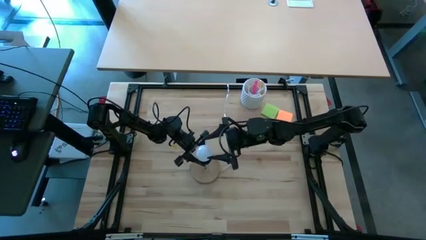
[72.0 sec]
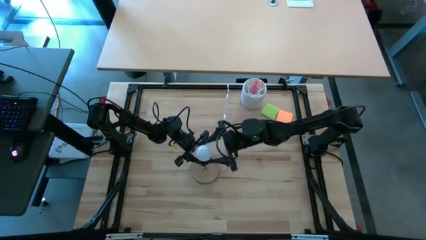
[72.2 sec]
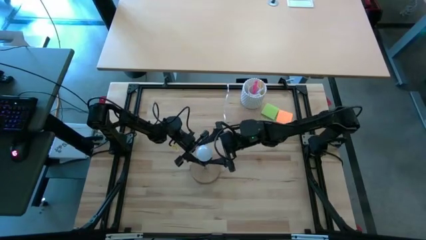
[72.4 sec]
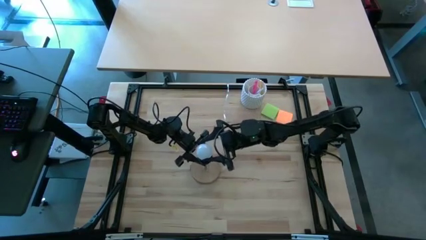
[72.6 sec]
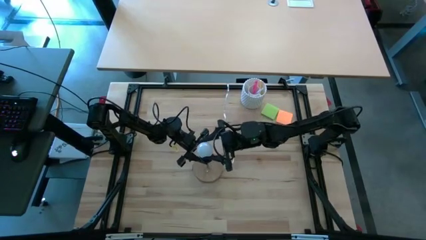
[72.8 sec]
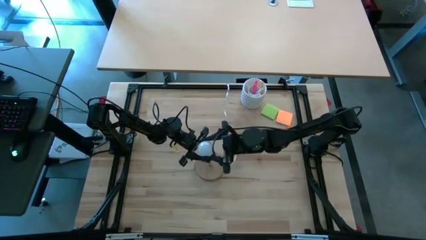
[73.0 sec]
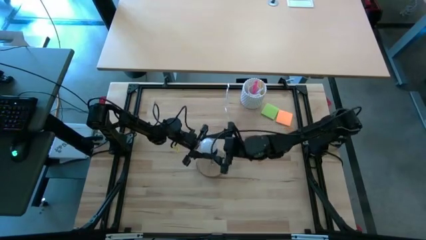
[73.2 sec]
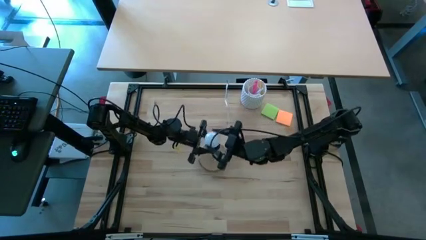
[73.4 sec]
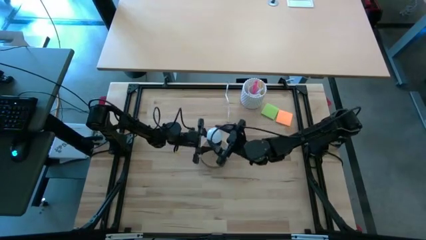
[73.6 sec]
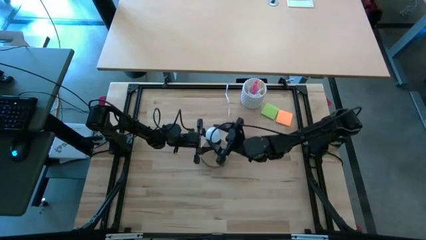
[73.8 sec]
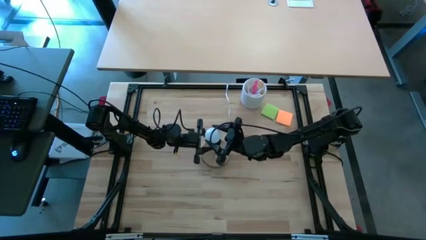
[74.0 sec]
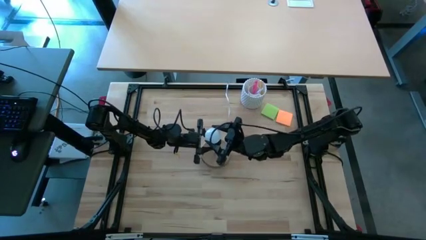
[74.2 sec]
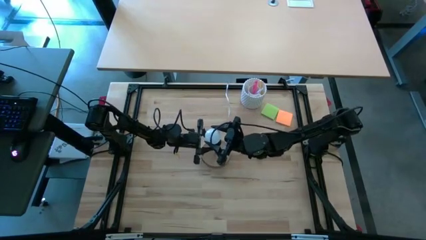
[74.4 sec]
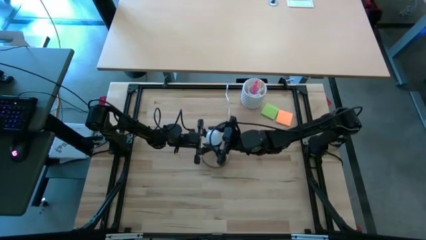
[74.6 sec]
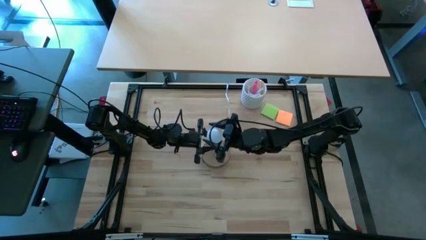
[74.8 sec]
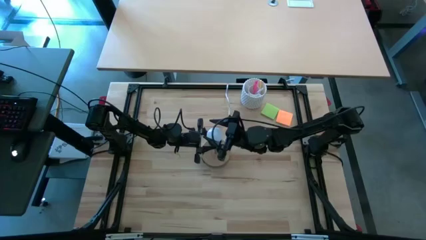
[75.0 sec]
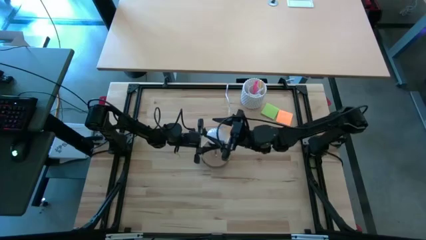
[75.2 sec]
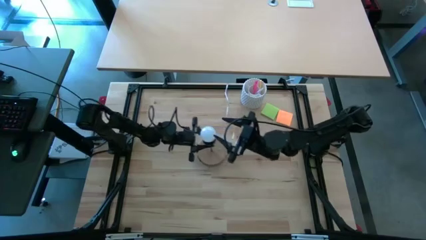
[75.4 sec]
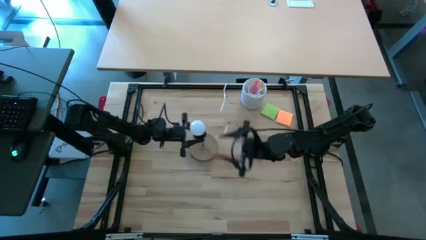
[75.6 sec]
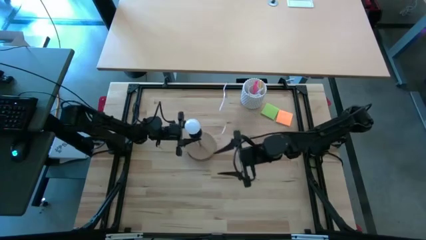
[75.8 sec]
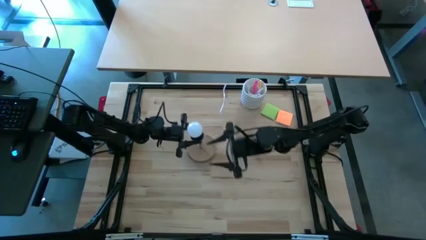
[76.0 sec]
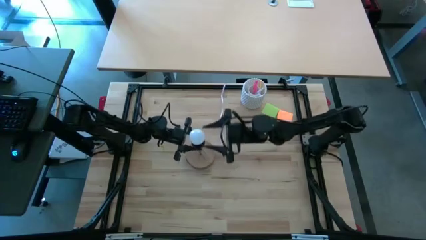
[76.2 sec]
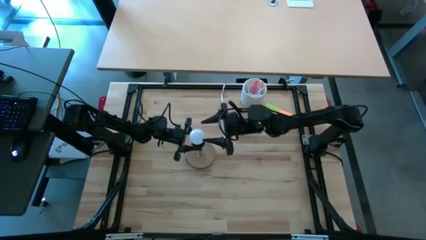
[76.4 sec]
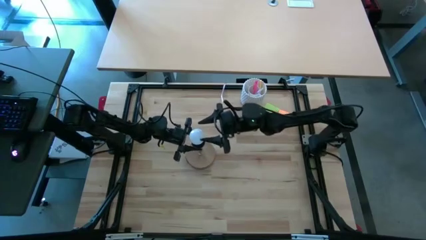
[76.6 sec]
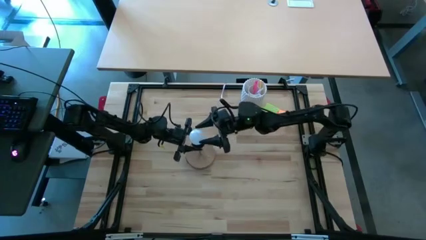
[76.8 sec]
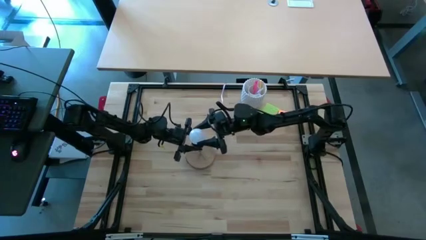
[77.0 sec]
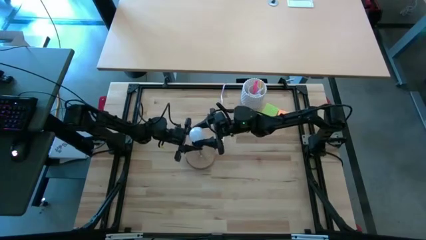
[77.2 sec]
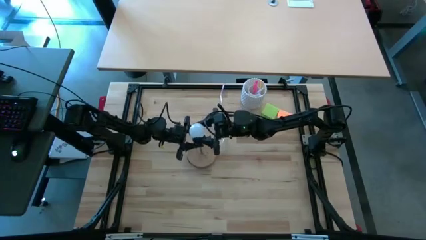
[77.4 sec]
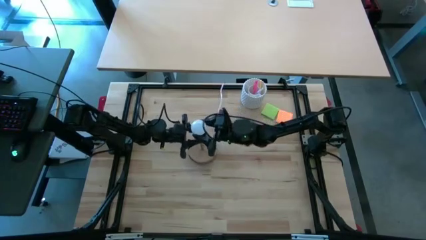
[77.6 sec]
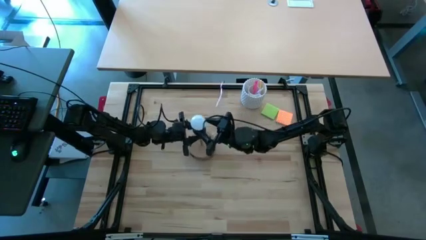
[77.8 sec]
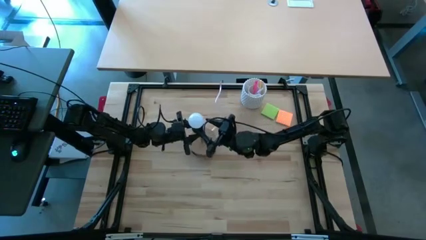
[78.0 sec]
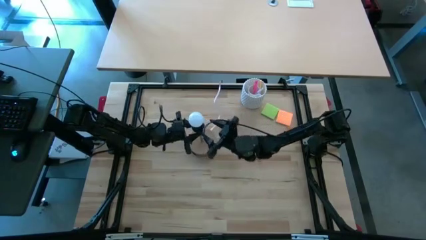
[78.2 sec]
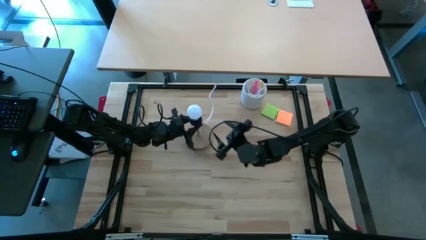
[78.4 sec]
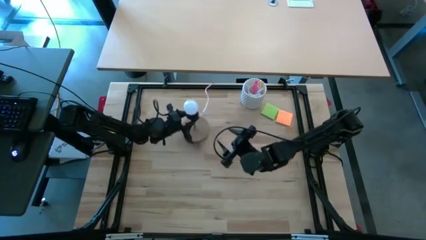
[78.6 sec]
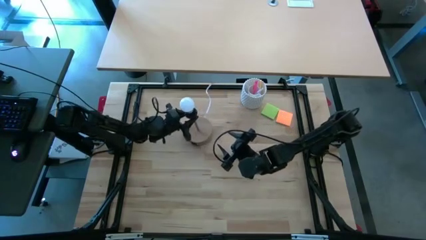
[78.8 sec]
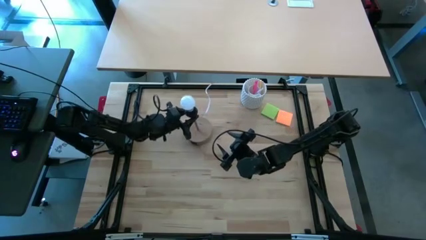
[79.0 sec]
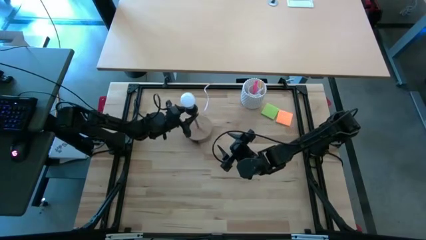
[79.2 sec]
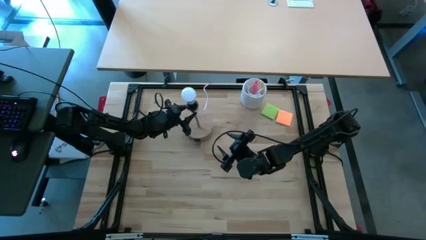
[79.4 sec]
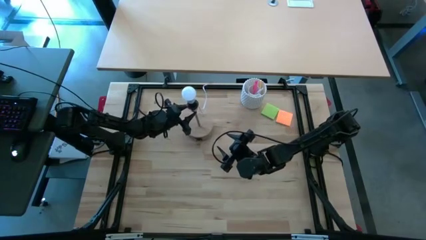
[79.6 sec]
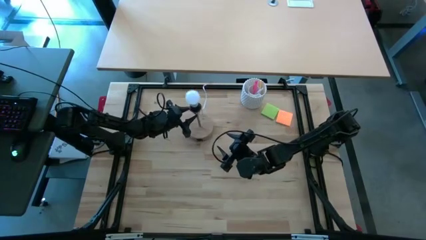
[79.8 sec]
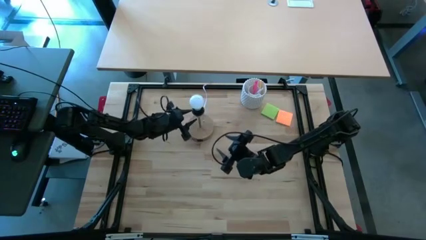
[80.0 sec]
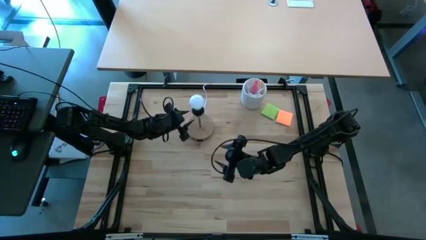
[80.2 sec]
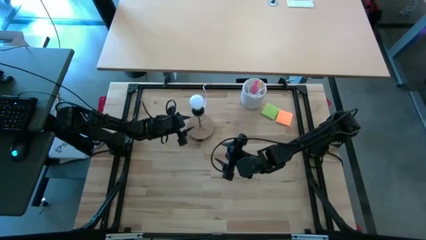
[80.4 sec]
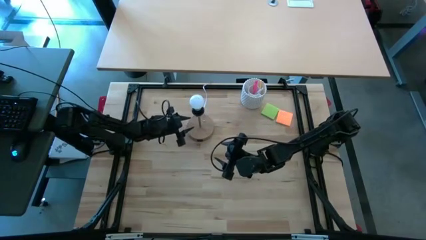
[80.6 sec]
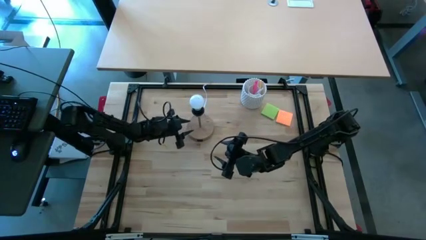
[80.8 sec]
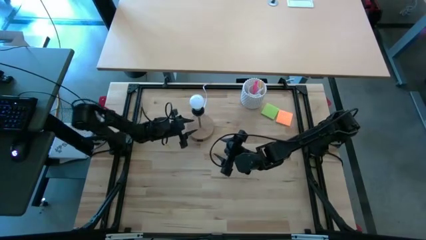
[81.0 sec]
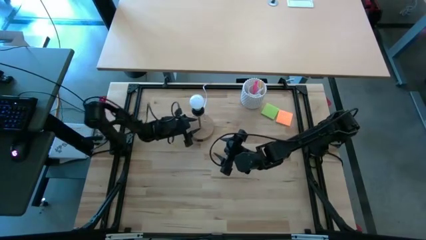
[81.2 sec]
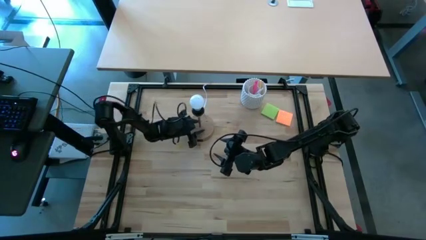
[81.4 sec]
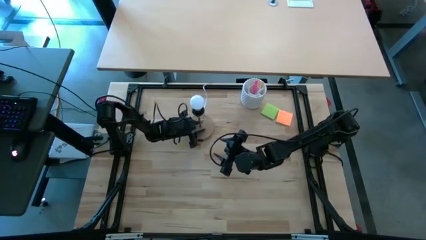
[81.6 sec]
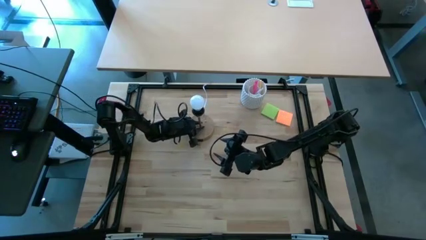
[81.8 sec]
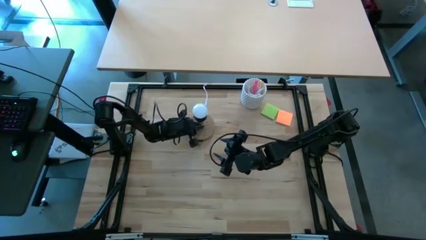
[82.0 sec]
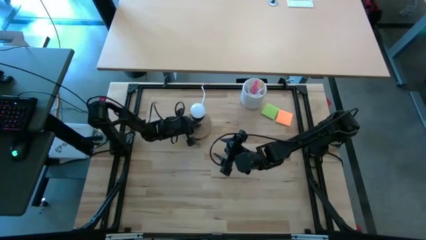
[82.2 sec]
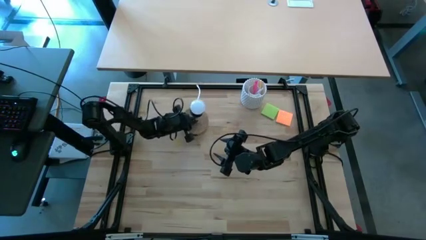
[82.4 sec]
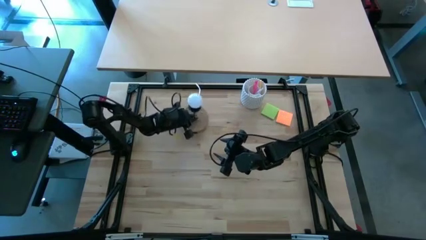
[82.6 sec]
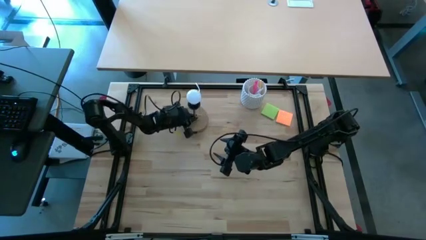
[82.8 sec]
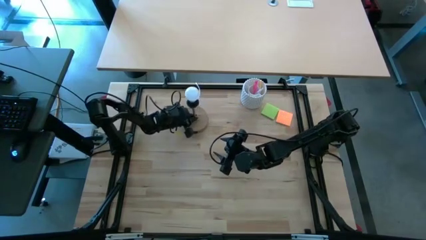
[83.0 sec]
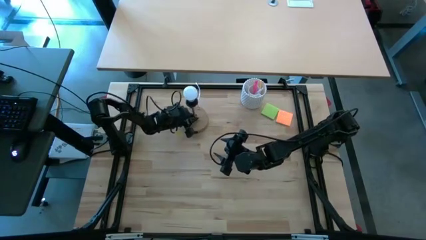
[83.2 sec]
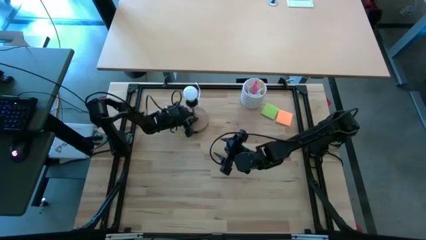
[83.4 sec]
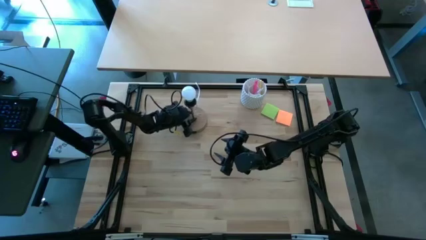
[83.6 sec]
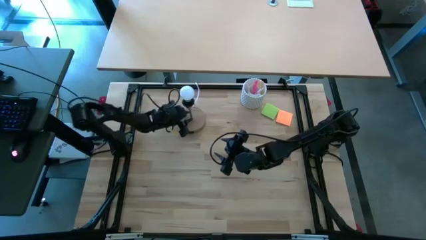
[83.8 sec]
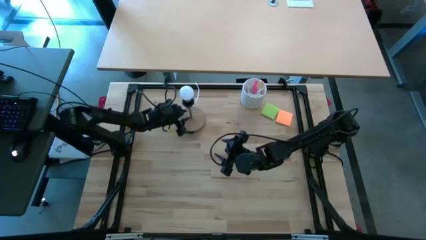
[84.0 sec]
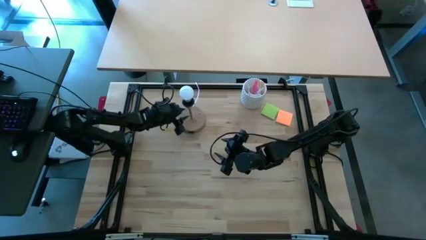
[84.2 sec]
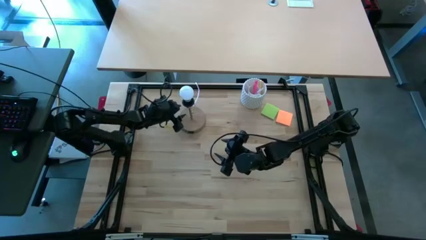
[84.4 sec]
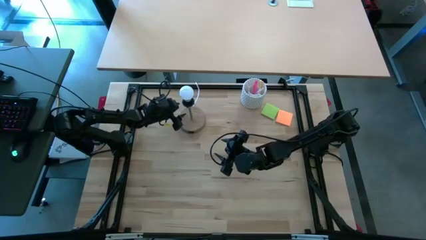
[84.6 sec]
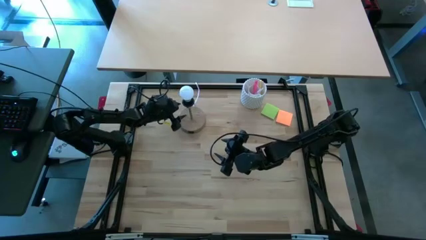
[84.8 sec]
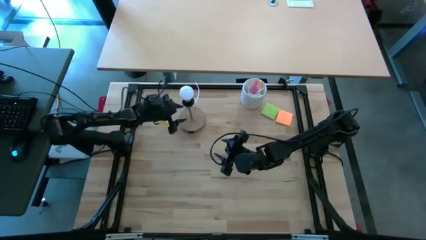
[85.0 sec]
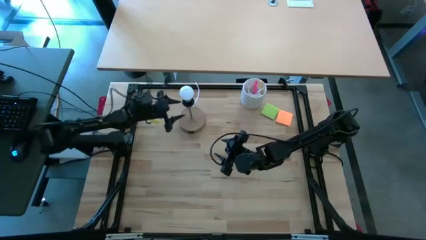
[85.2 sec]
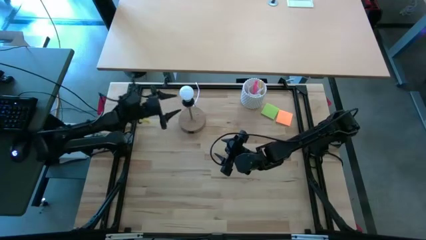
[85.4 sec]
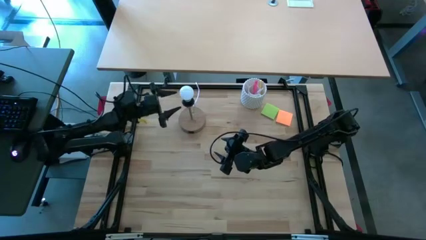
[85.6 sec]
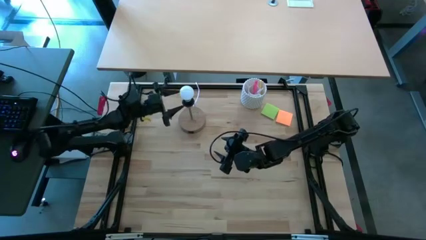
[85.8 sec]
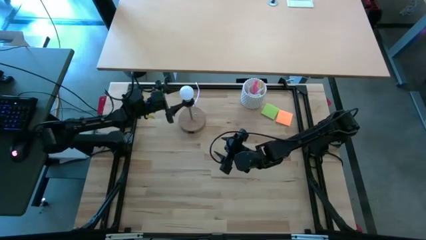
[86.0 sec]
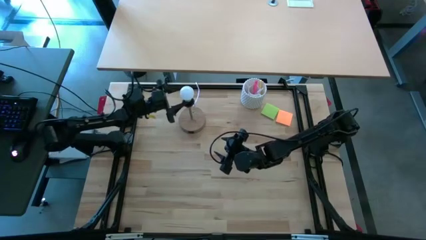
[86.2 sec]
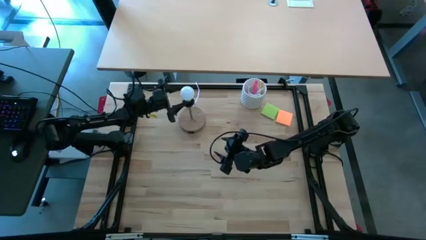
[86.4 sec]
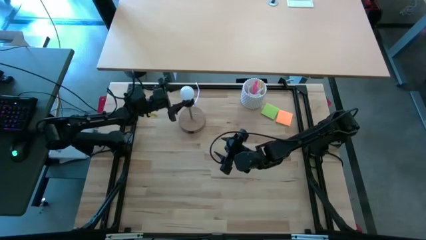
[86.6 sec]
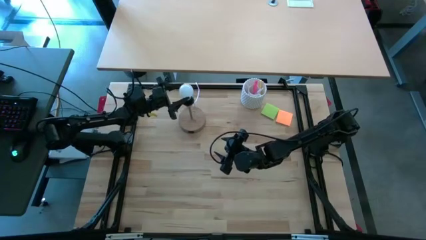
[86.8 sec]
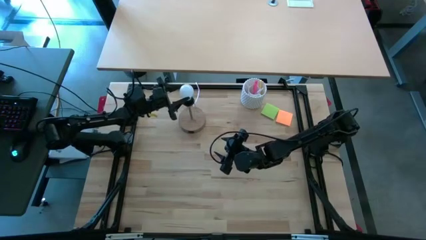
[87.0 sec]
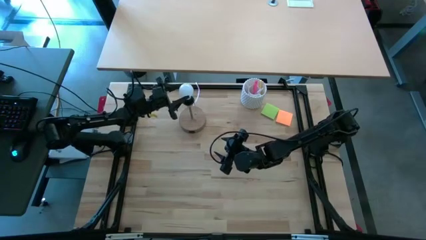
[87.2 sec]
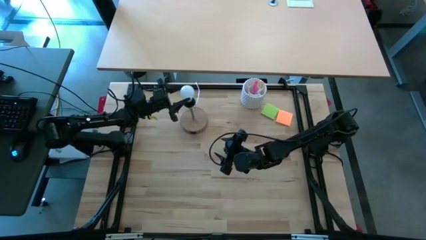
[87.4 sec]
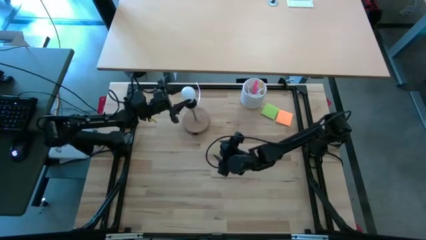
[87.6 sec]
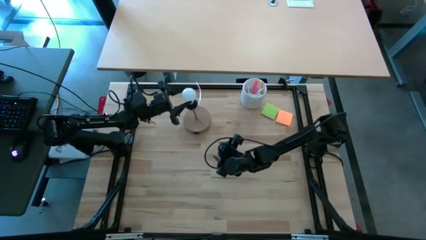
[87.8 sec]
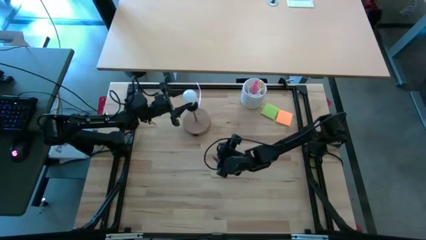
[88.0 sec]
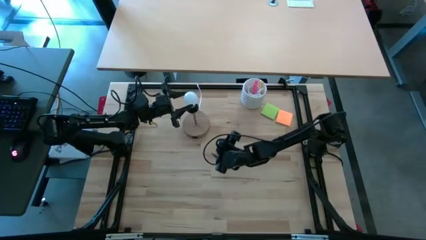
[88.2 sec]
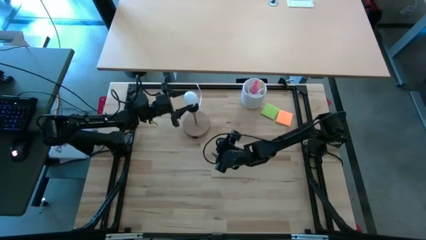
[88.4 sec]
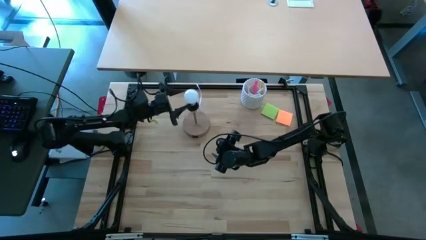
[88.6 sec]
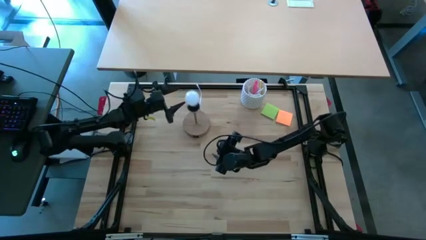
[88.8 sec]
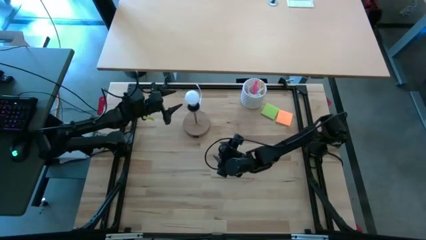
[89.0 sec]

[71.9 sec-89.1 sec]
Task: Screw lightbulb
Insert the white lightbulb into the desk lamp
